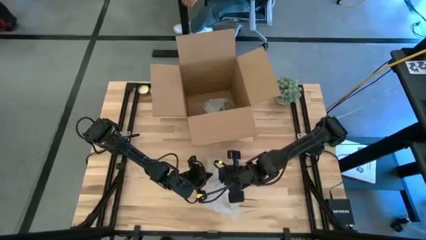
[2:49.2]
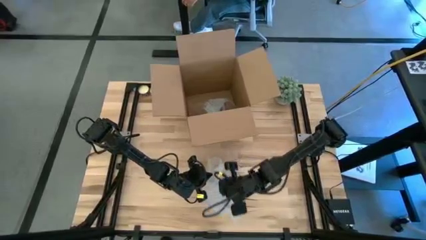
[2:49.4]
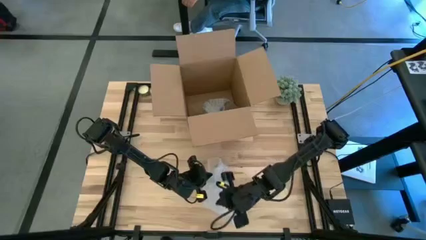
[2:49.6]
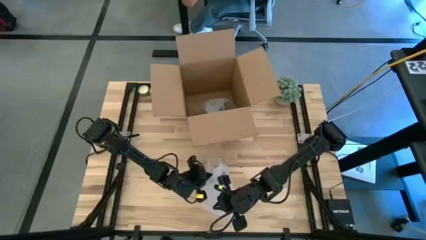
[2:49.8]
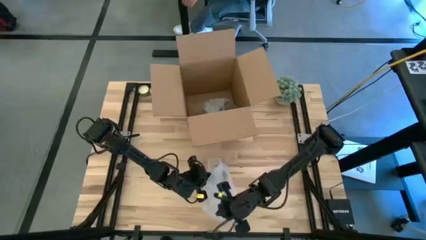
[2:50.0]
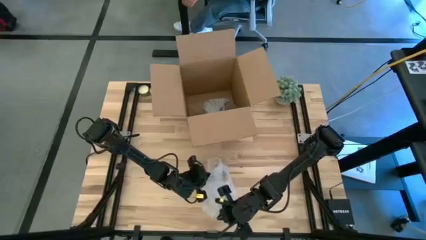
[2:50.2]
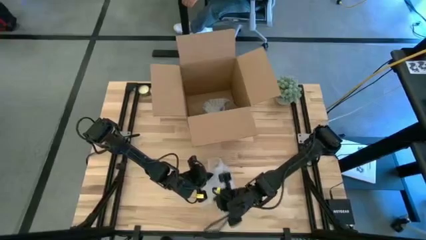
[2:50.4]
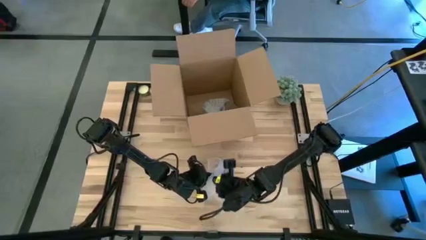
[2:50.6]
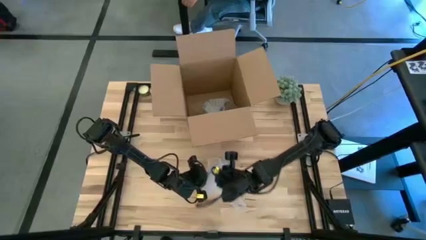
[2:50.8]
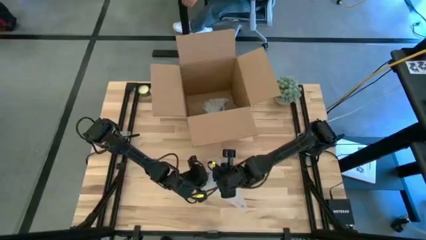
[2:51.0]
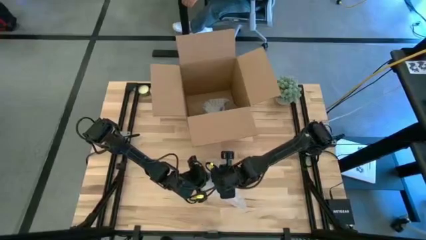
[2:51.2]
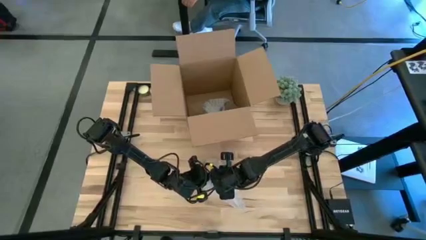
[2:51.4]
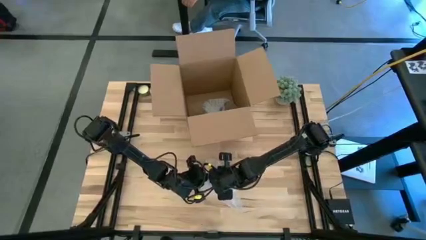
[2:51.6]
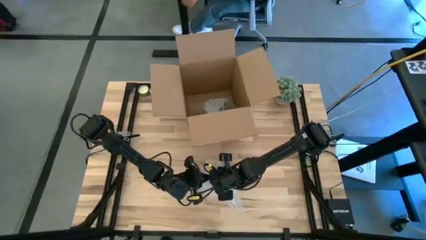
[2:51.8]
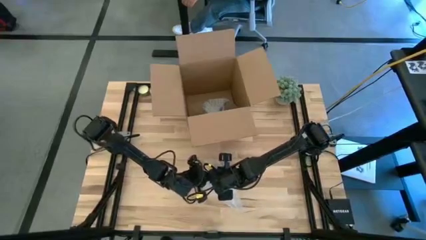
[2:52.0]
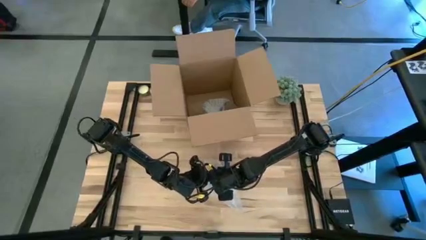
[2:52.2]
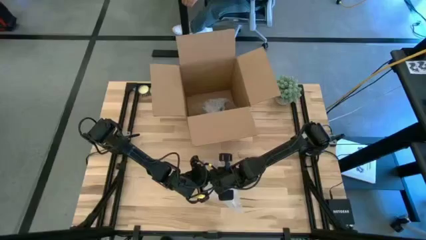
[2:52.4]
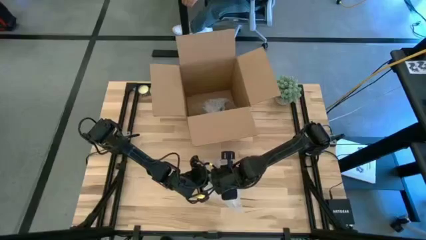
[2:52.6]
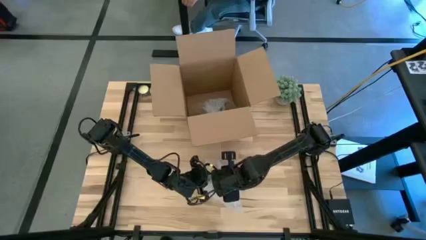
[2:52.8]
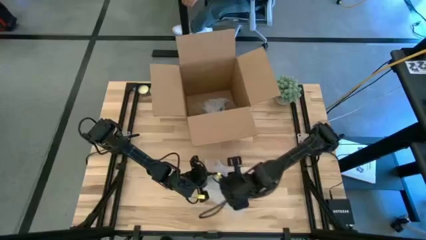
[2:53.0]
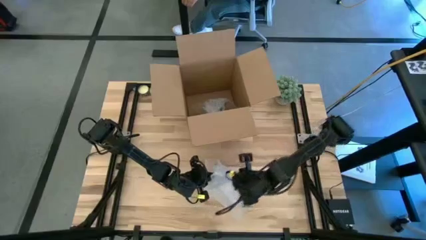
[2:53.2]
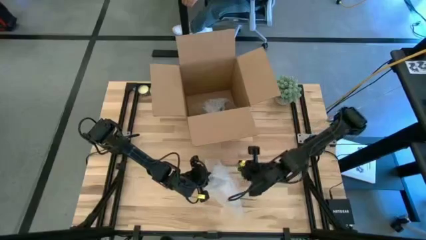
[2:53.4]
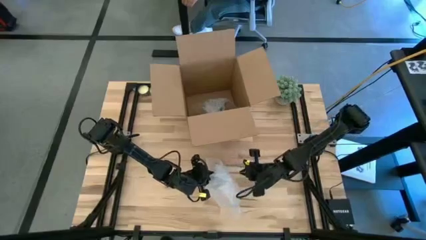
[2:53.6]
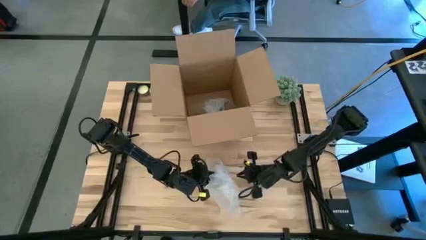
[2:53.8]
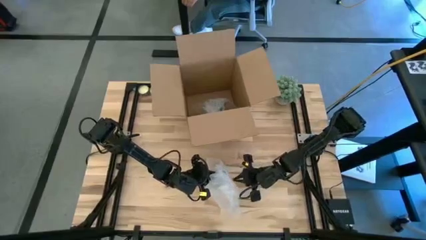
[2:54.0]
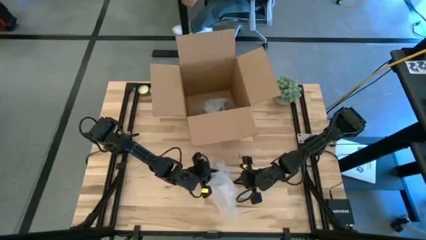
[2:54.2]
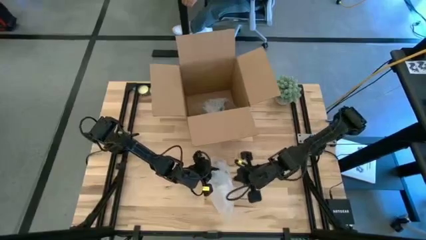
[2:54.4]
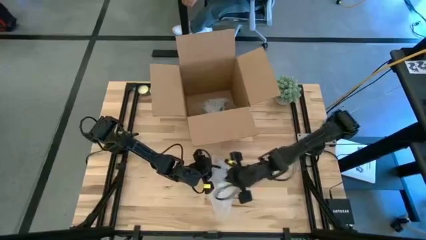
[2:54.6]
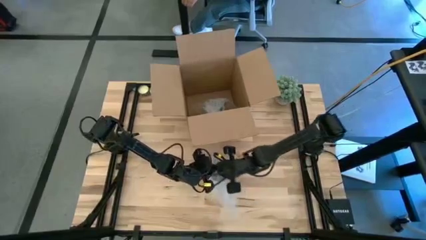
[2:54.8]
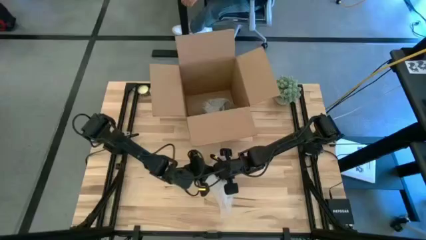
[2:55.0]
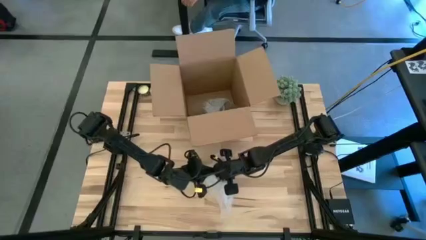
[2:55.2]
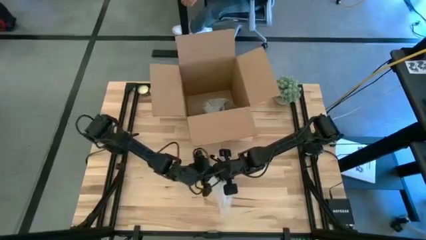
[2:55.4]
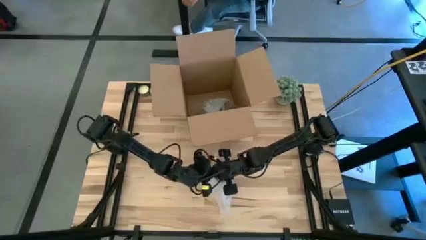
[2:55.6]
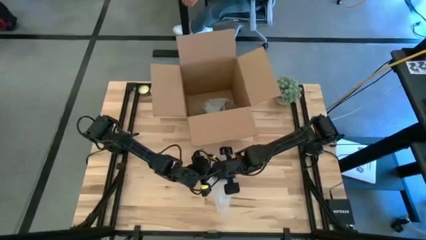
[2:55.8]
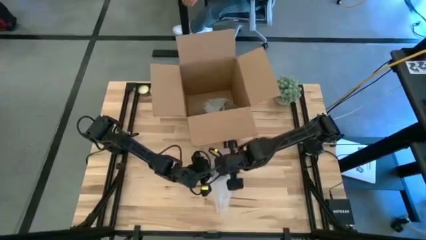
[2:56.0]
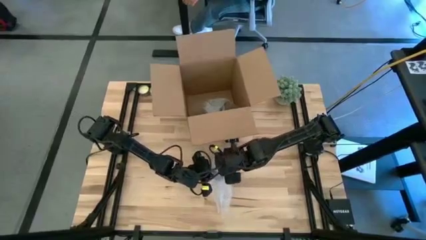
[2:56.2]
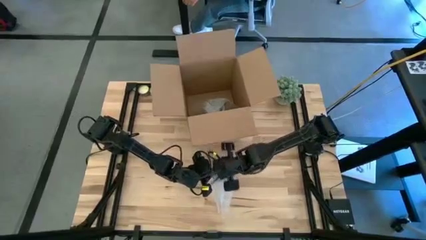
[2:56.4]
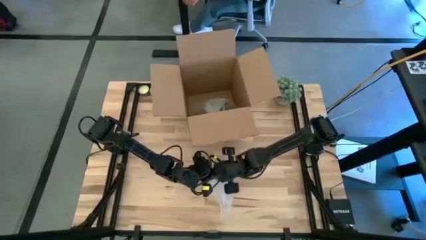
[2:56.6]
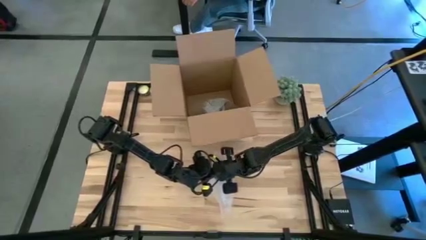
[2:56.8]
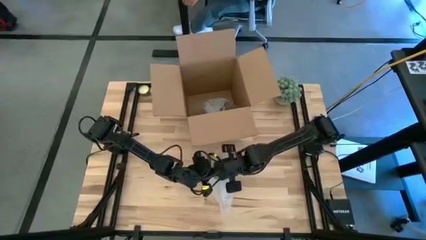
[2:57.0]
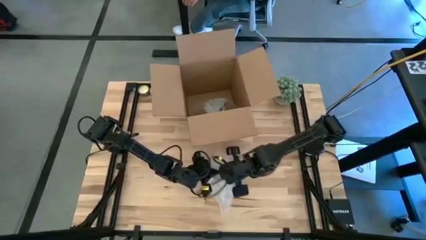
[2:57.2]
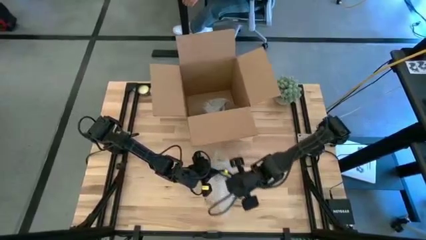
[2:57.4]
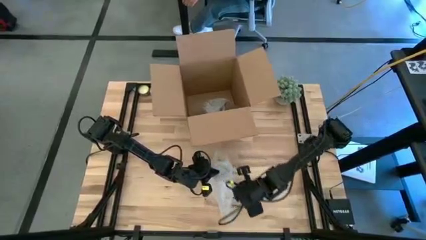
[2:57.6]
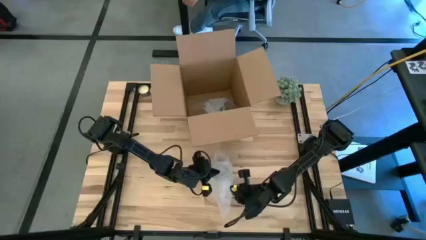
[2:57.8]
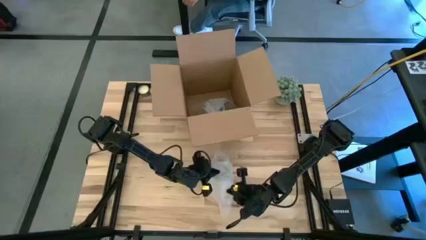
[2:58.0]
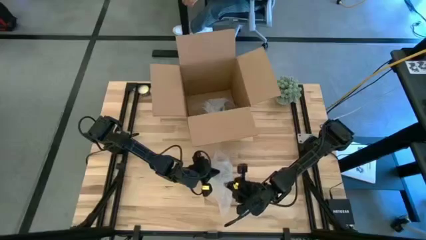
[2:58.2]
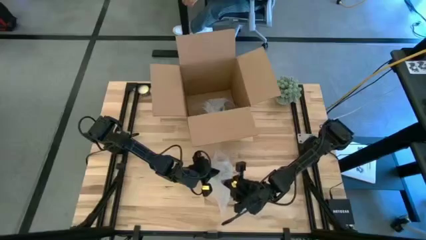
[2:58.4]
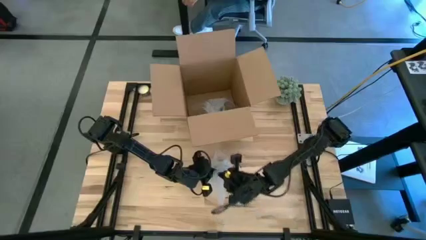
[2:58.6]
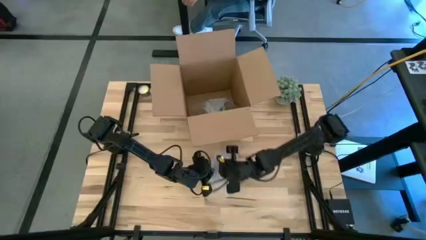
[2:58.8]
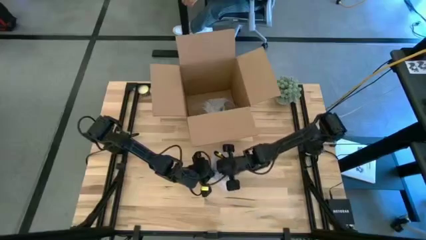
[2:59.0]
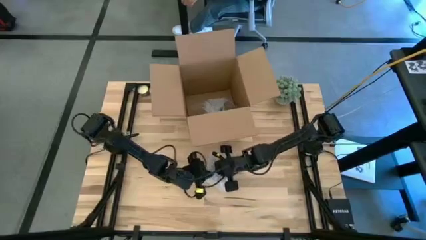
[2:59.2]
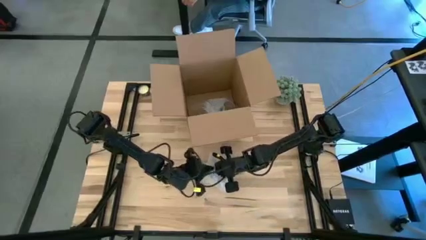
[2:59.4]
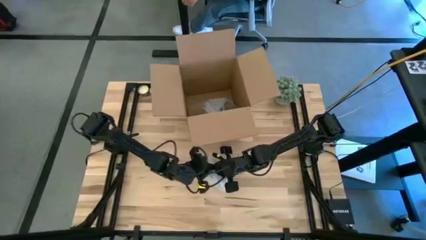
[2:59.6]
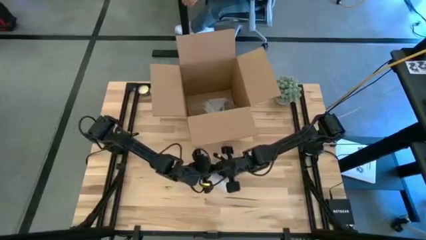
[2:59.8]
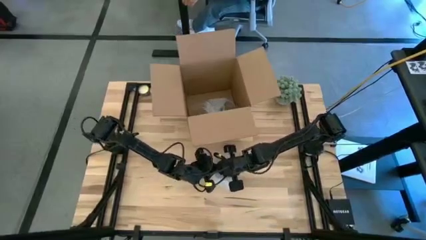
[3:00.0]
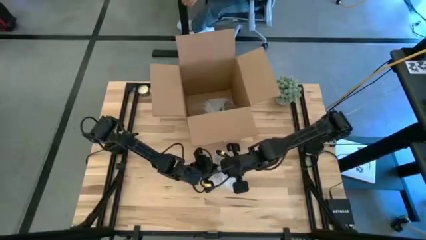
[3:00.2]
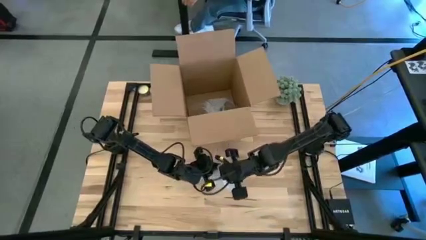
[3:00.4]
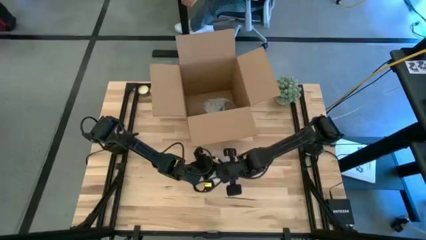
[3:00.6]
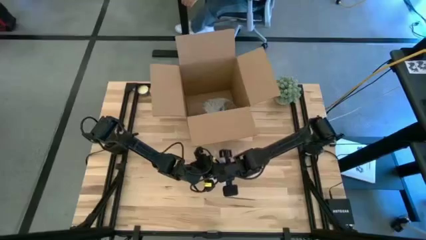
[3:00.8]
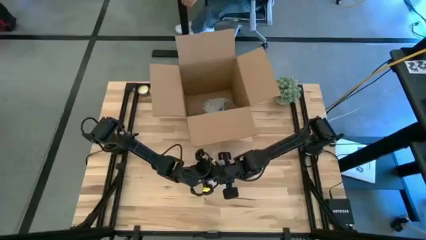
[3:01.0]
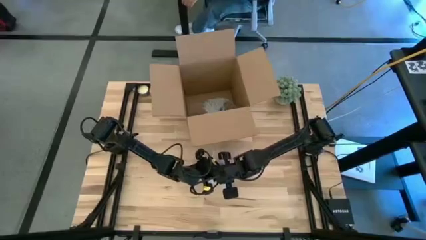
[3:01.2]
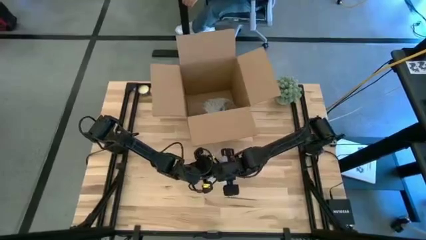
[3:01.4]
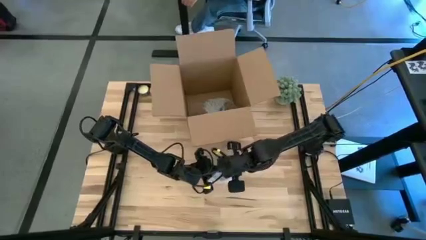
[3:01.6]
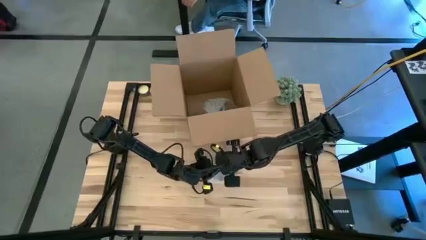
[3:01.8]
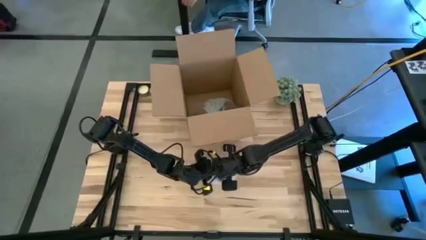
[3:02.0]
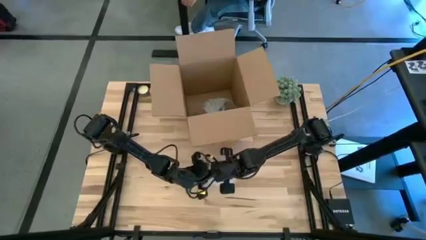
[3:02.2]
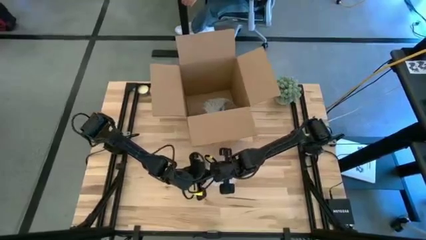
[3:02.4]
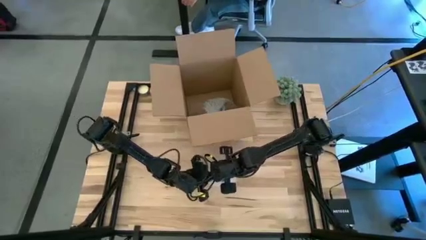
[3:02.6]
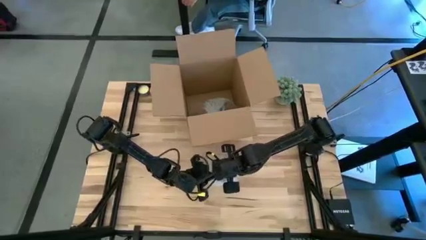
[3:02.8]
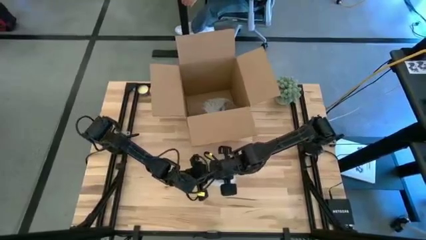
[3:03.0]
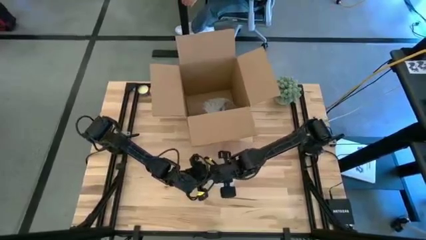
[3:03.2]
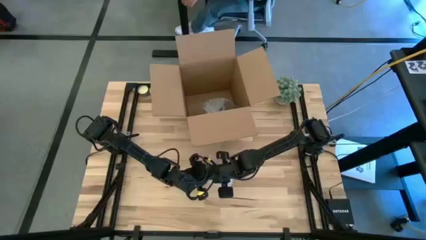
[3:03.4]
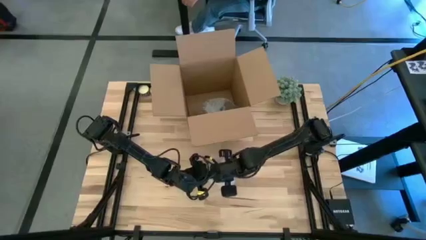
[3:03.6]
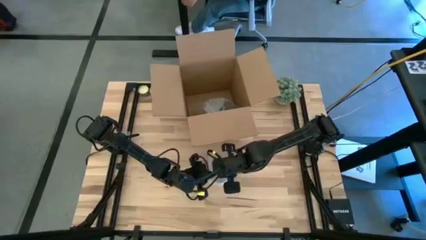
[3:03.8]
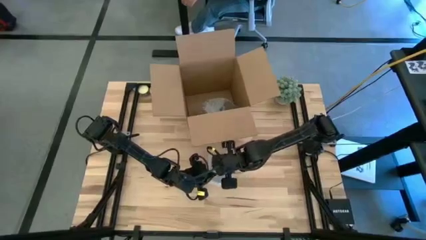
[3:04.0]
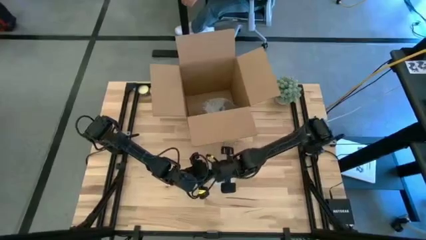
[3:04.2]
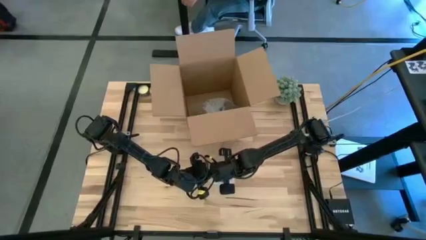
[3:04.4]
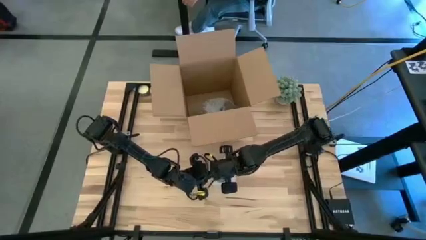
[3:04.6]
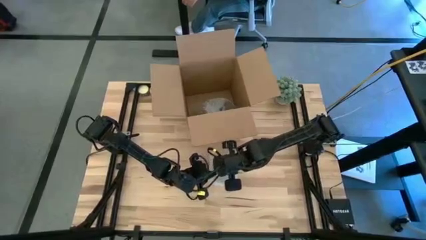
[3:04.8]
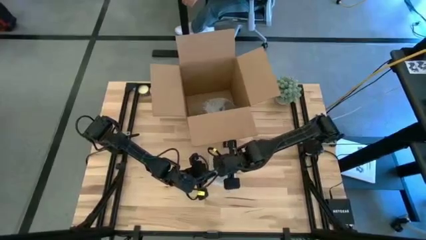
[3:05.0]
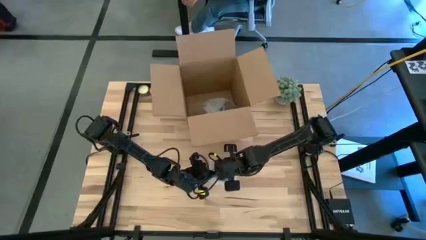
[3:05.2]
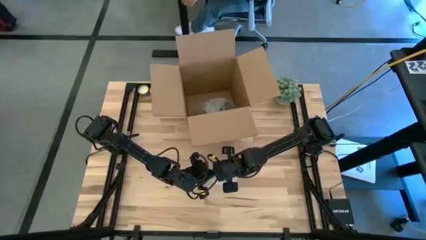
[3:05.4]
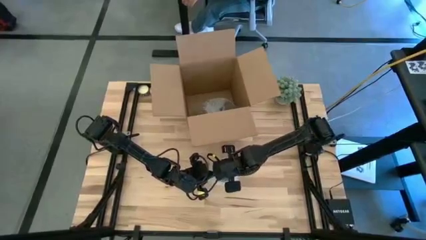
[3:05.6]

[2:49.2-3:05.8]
Task: wrap mug
Wrap the white patterned mug with the transparent bubble wrap
